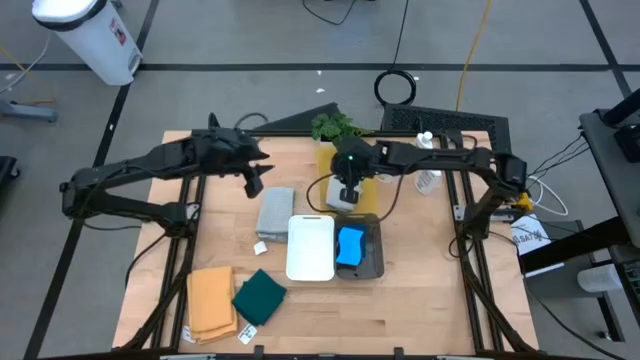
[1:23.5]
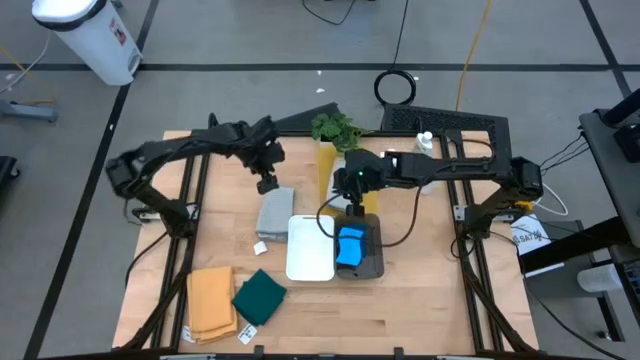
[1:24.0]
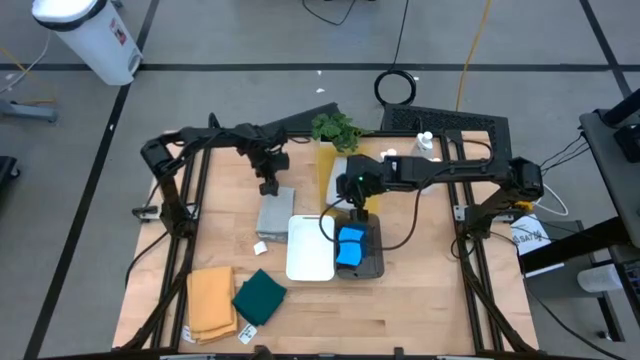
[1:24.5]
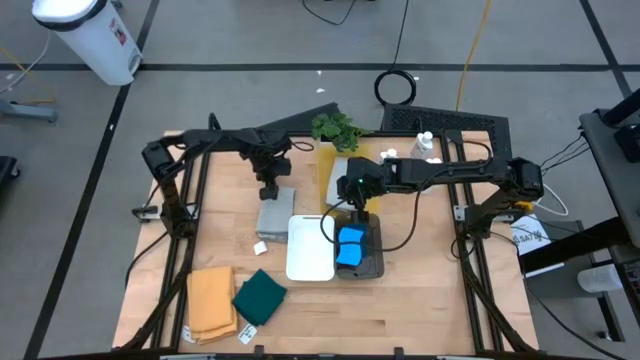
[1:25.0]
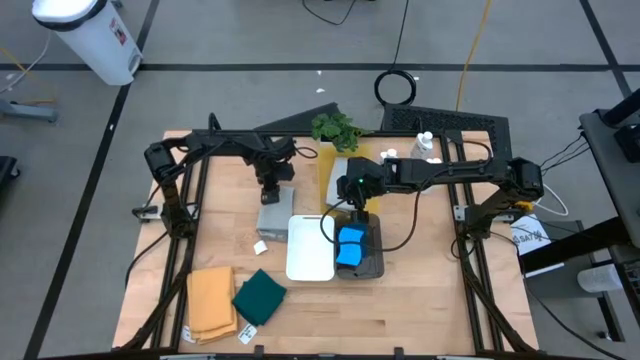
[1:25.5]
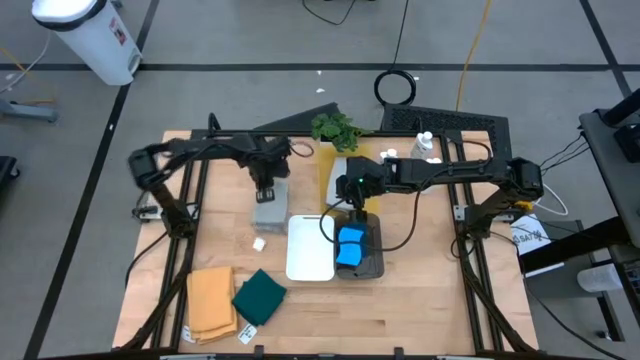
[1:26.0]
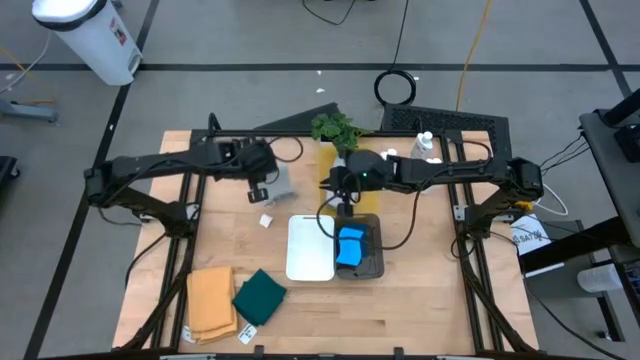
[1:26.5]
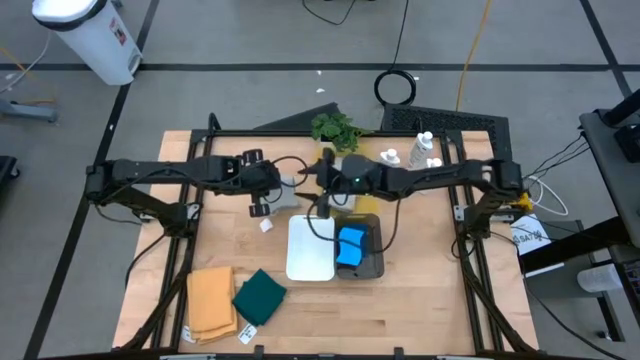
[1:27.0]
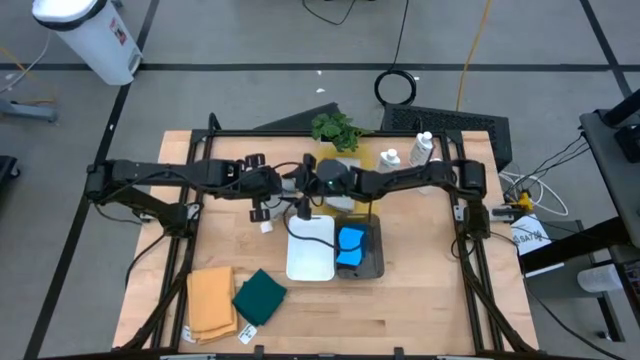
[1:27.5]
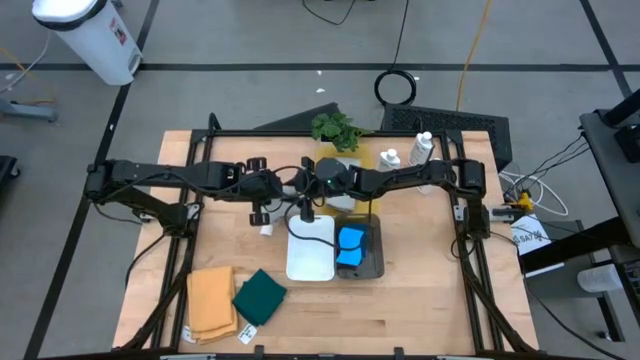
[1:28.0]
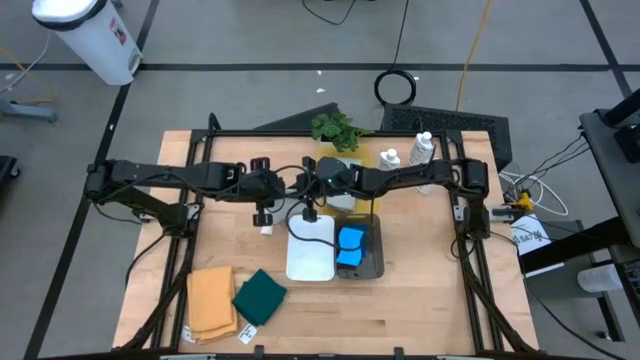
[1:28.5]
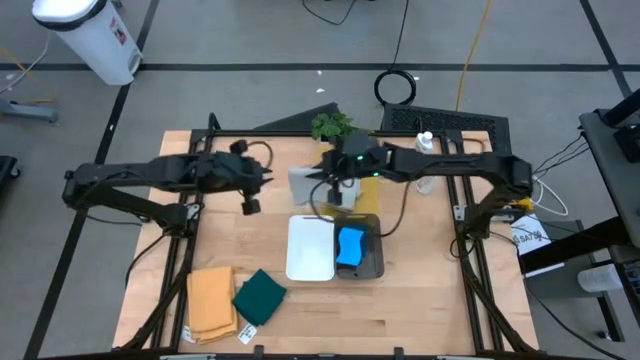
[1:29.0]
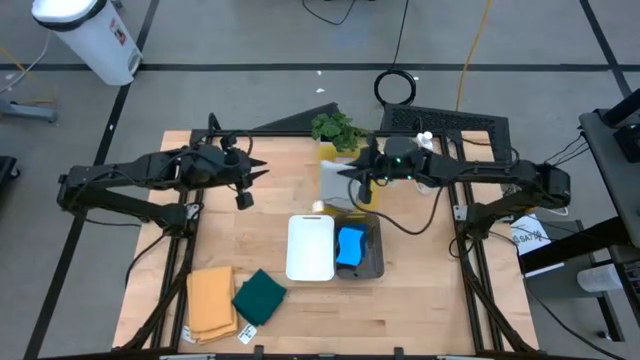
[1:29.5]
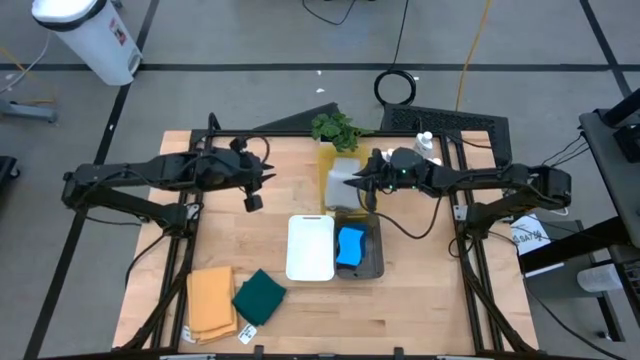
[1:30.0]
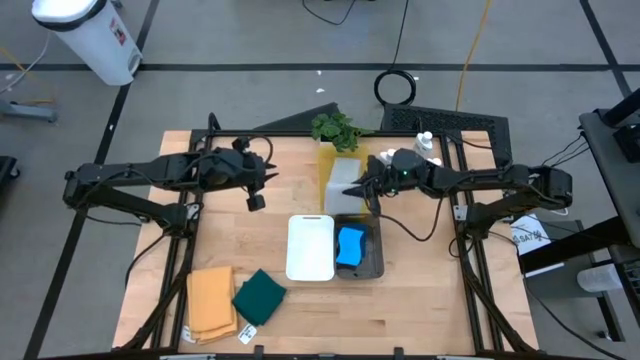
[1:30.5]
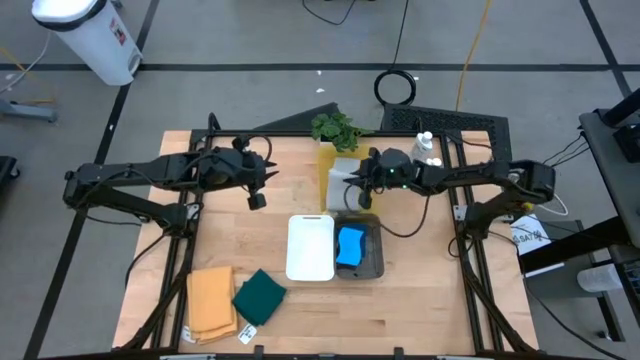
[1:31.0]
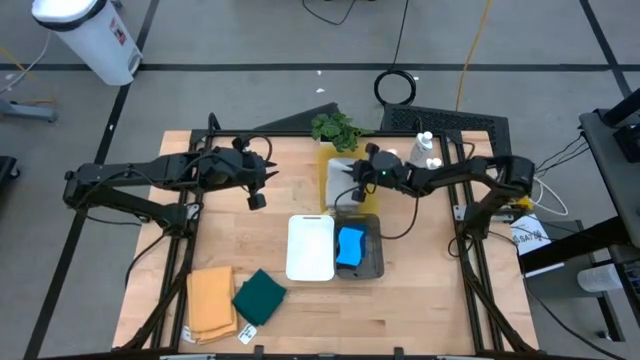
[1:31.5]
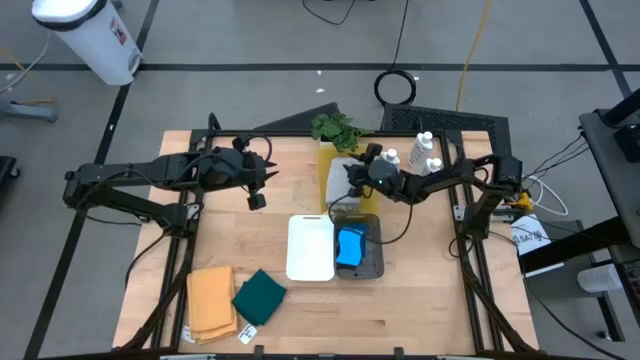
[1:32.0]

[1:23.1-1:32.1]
Task: Pick & Place Kitchen Items
Put the gray microfiber into the yellow bin

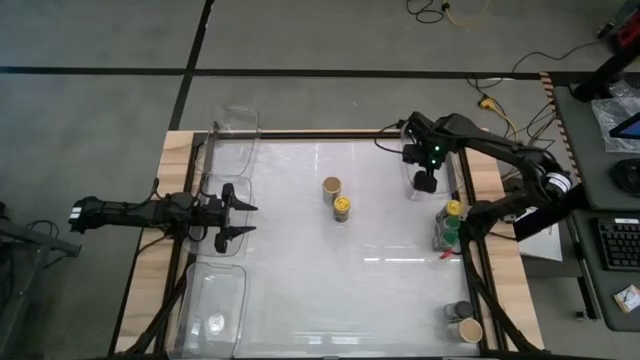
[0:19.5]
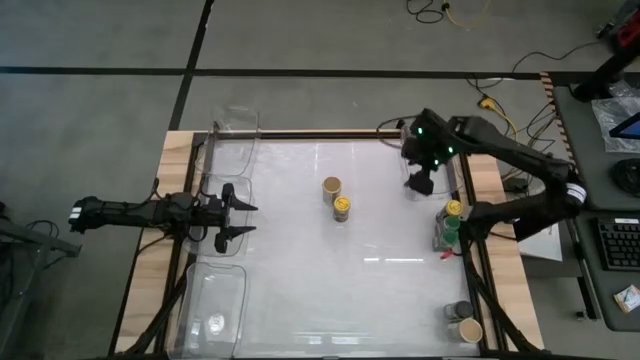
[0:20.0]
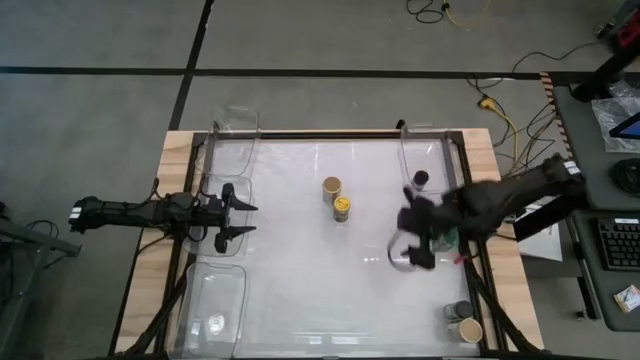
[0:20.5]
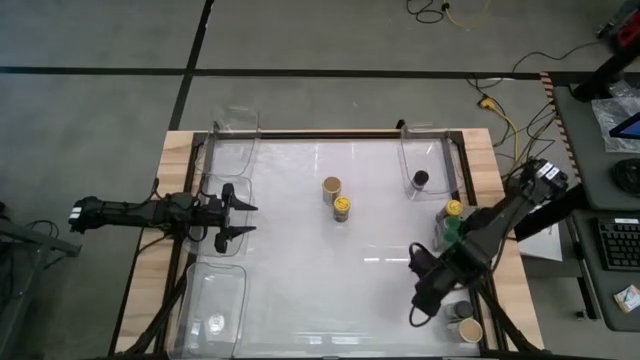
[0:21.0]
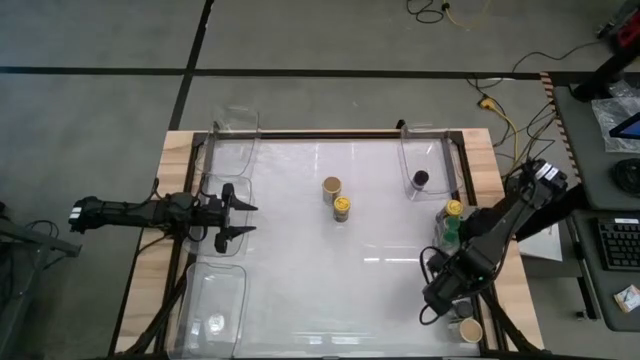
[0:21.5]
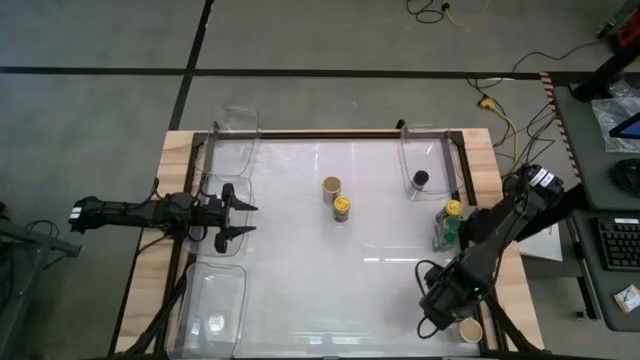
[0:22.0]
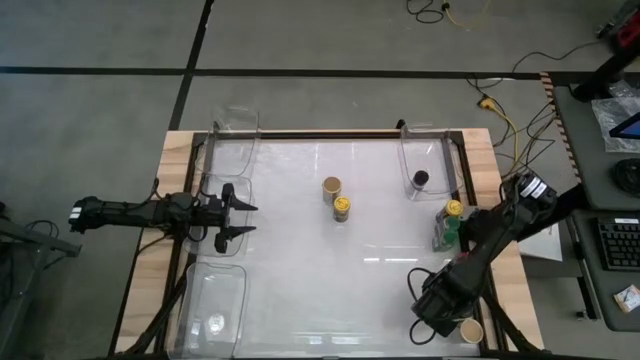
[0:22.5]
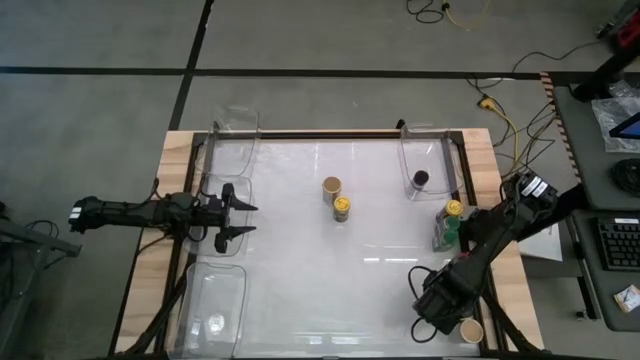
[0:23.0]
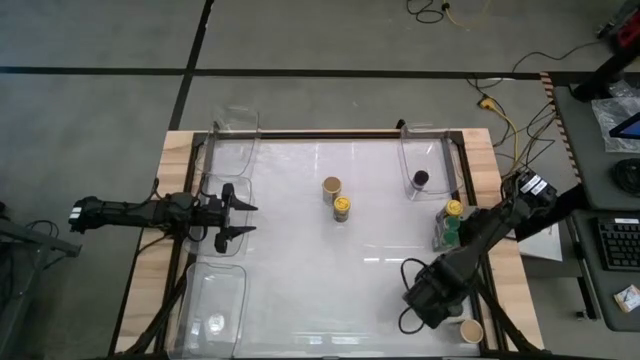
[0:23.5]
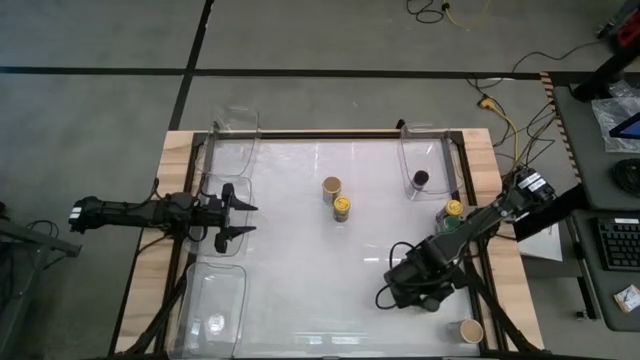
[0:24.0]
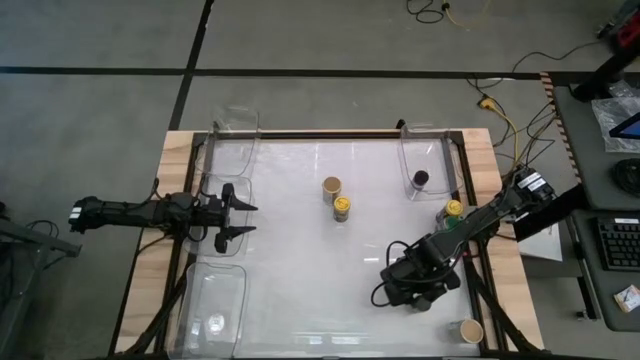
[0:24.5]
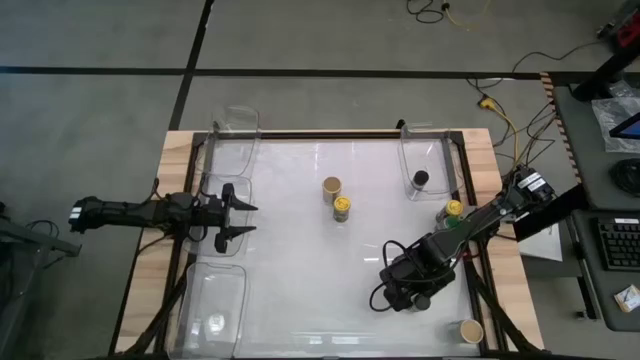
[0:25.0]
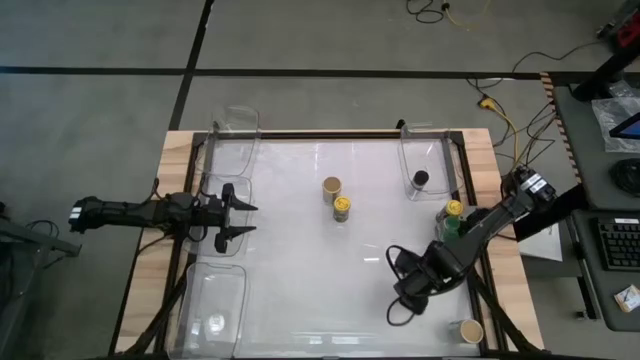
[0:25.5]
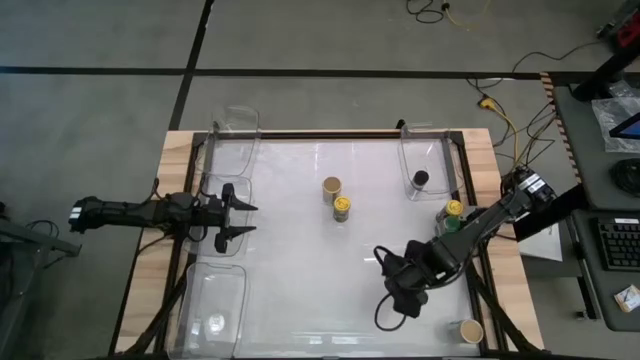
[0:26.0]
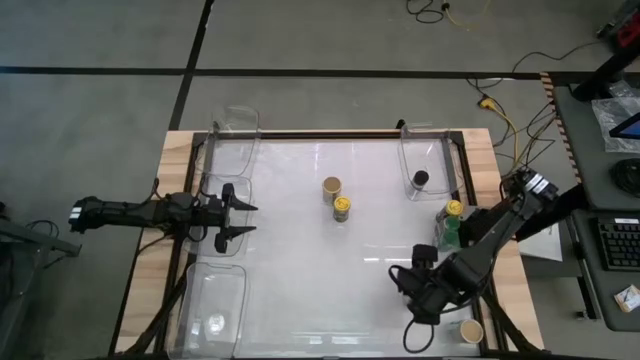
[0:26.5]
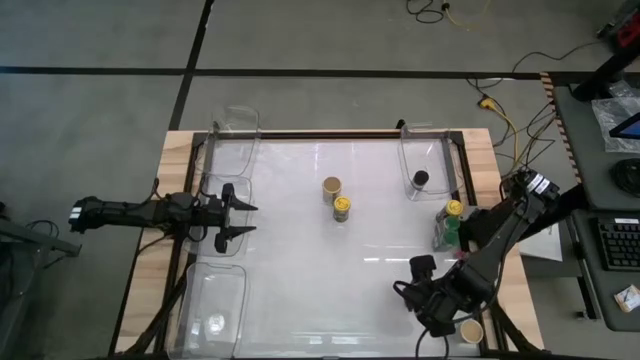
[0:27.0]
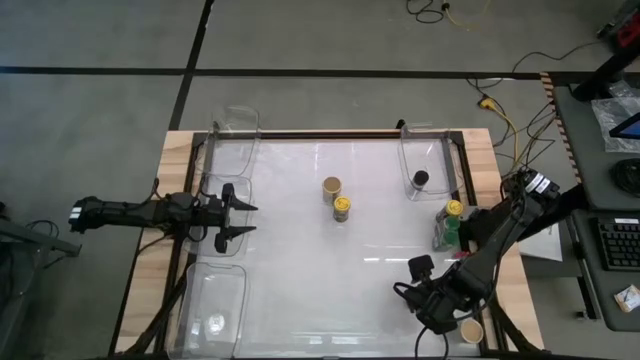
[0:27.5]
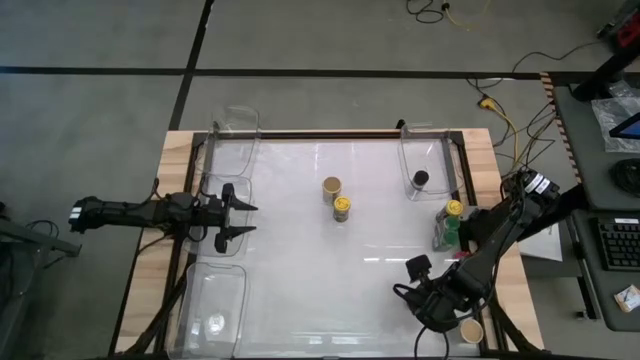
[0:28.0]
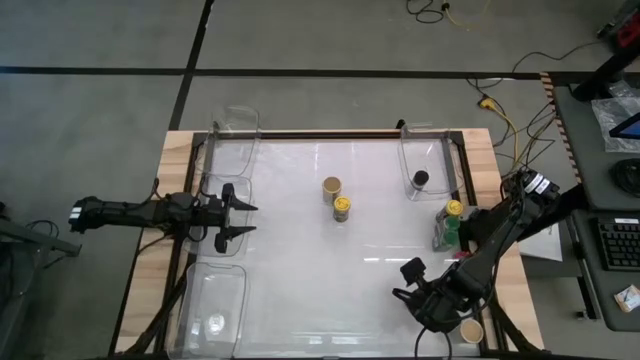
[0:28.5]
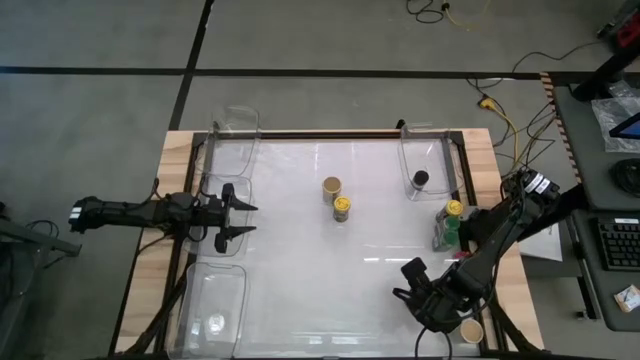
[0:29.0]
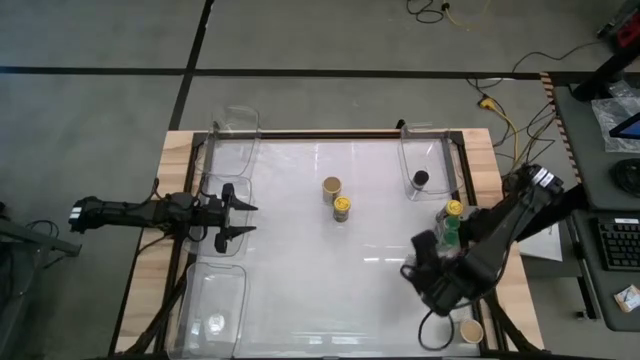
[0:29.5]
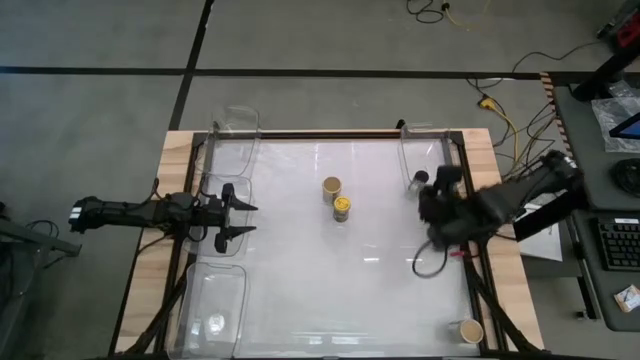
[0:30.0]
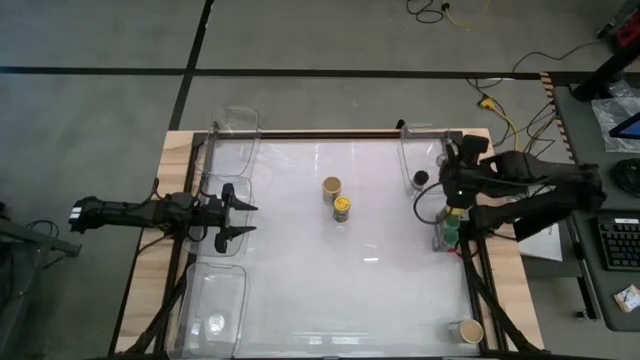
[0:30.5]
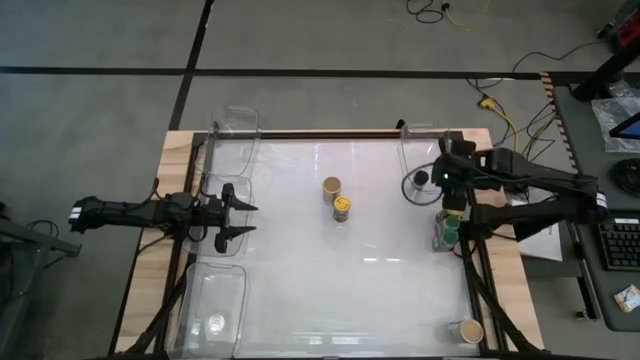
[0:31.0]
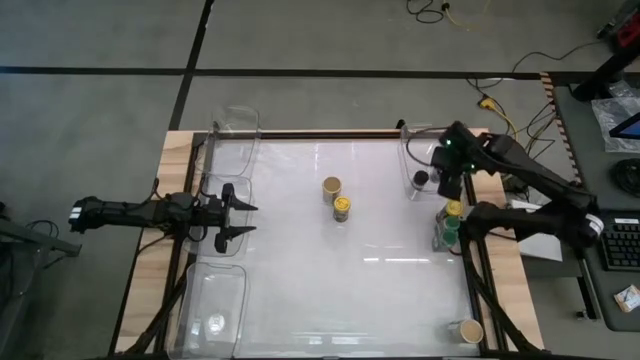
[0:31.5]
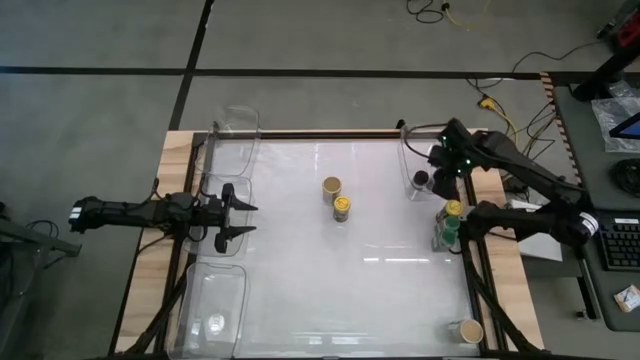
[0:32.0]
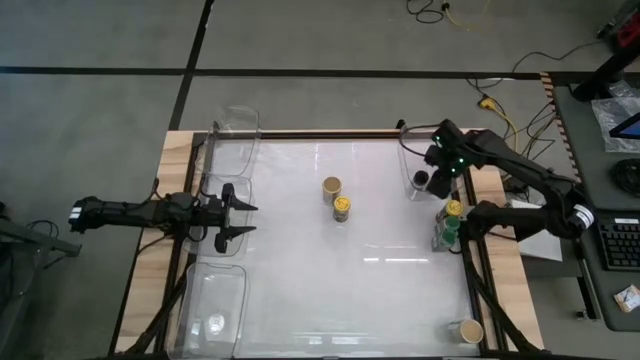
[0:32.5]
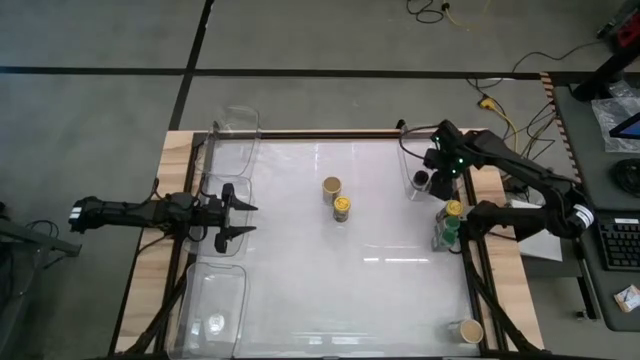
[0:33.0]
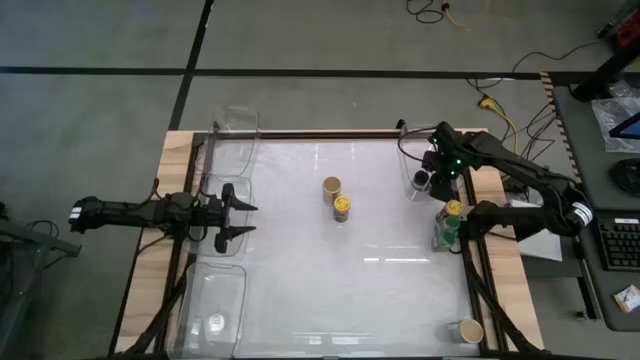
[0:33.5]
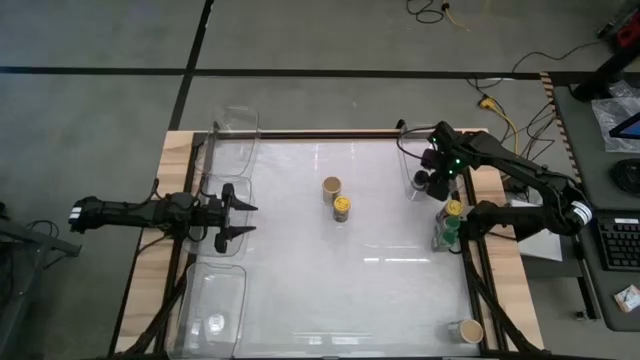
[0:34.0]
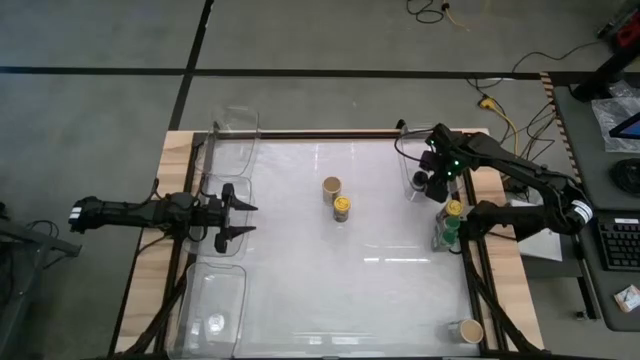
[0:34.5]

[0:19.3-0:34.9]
Task: Sort spices by type
Put the black spice bottle into the top right transparent bin
